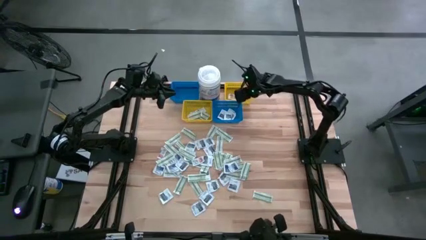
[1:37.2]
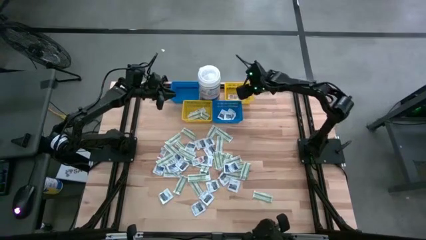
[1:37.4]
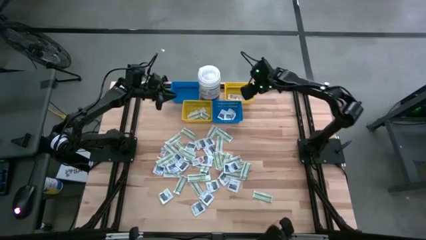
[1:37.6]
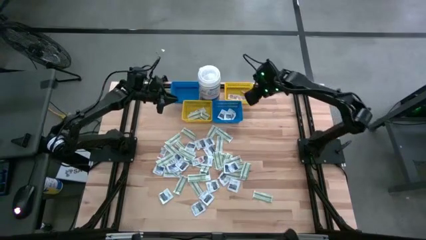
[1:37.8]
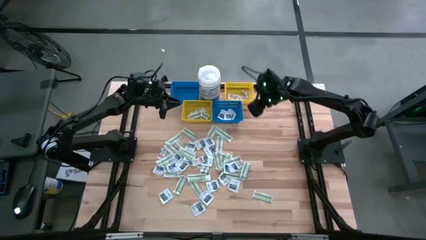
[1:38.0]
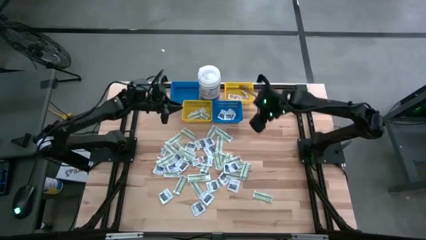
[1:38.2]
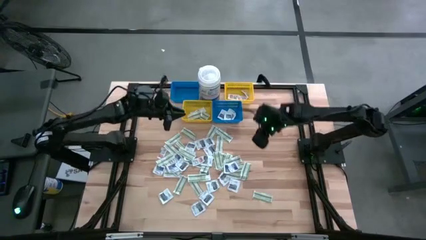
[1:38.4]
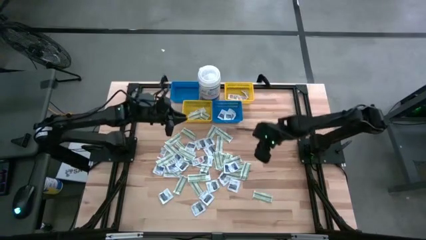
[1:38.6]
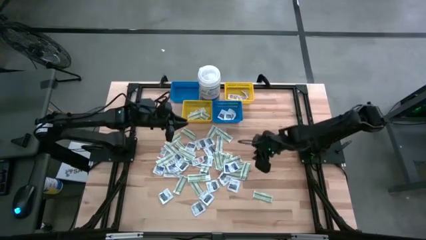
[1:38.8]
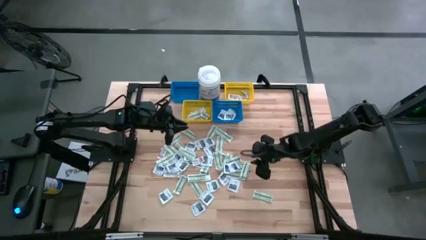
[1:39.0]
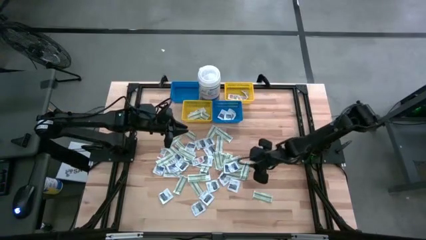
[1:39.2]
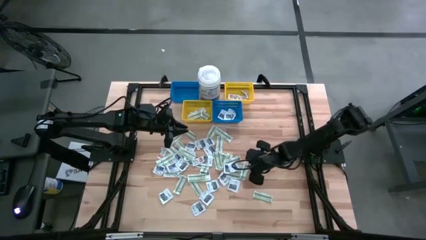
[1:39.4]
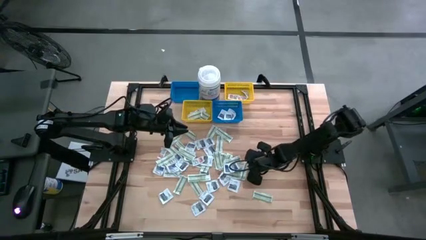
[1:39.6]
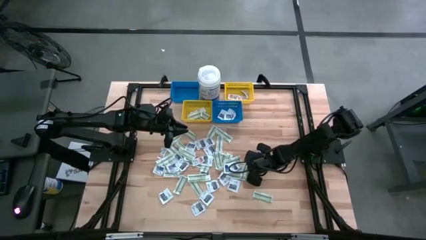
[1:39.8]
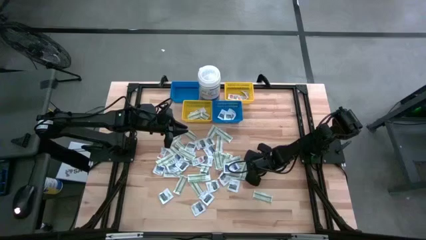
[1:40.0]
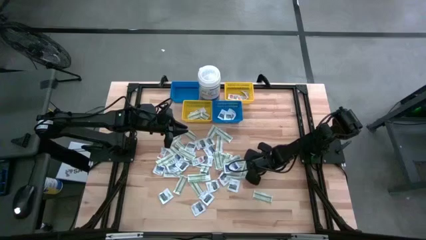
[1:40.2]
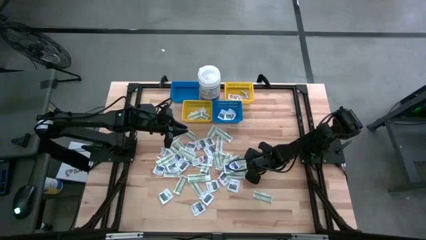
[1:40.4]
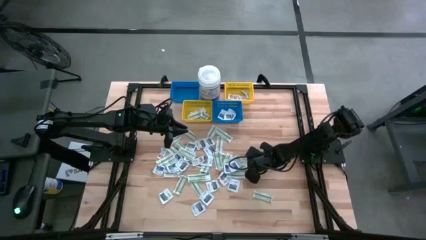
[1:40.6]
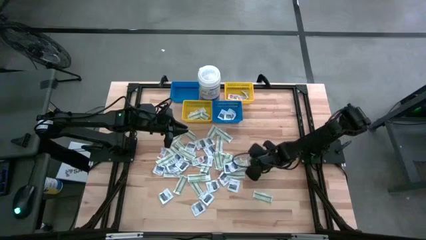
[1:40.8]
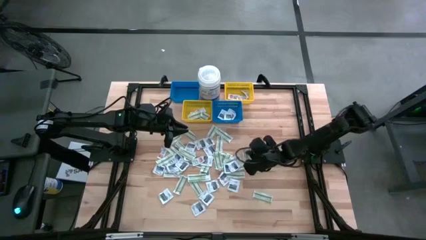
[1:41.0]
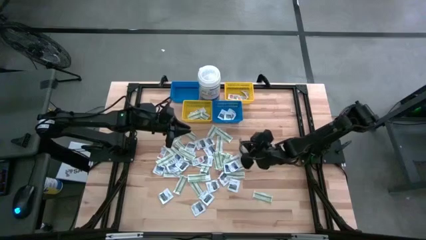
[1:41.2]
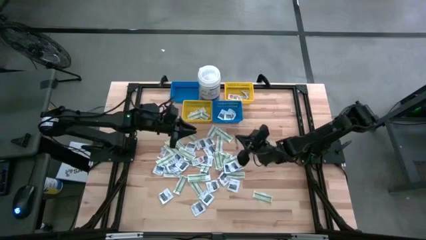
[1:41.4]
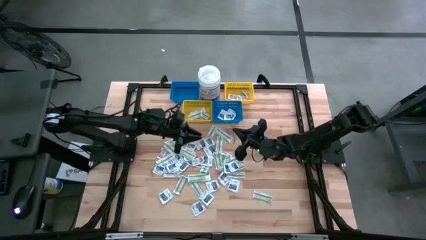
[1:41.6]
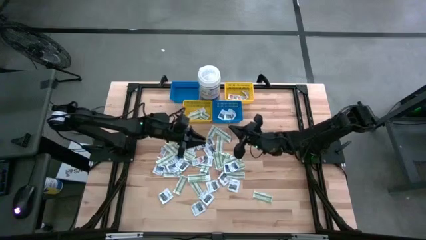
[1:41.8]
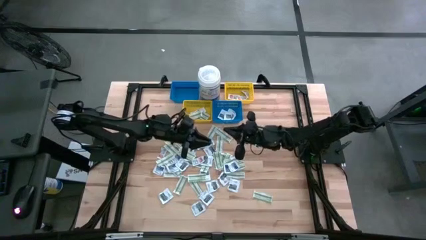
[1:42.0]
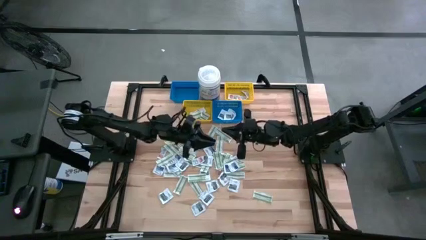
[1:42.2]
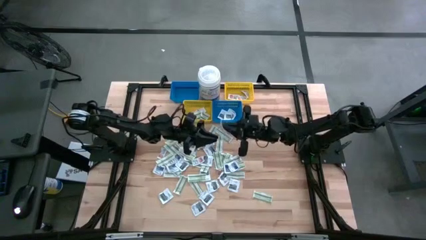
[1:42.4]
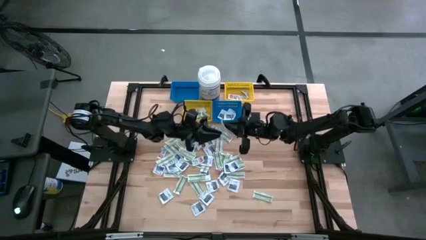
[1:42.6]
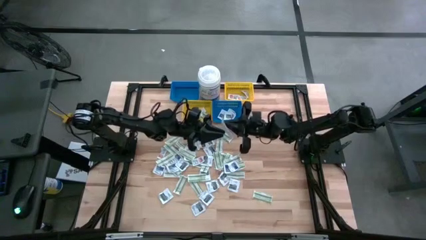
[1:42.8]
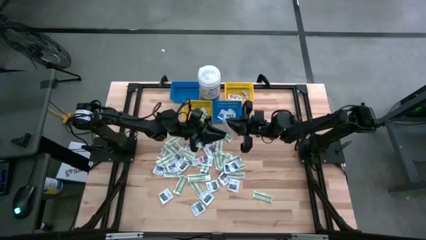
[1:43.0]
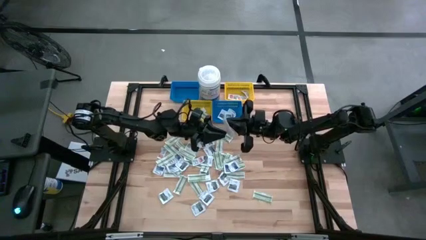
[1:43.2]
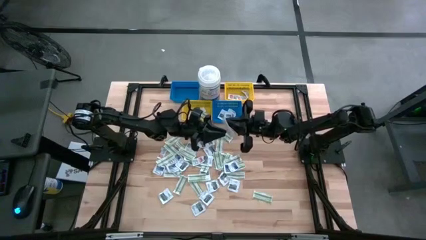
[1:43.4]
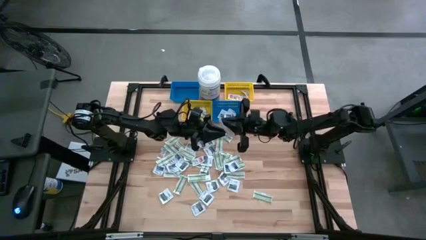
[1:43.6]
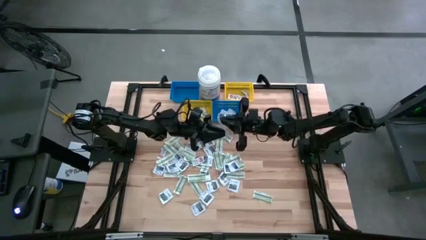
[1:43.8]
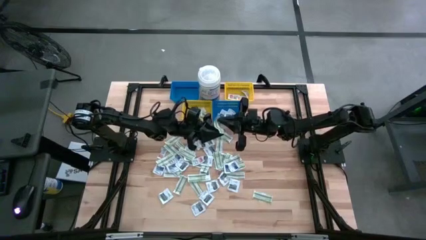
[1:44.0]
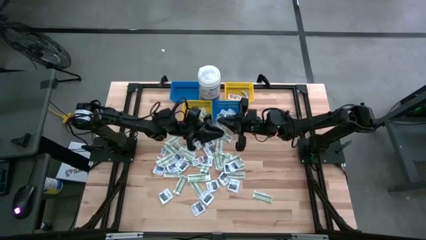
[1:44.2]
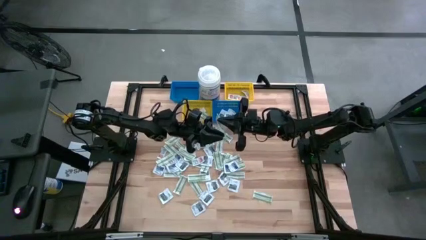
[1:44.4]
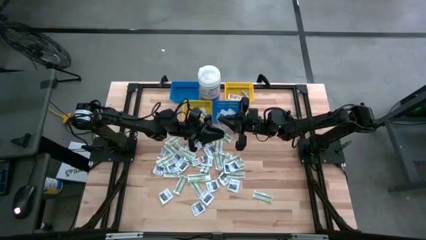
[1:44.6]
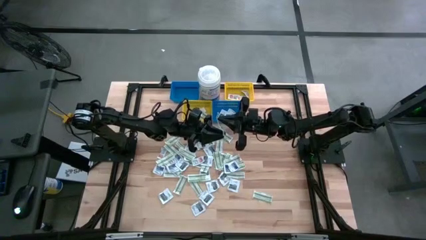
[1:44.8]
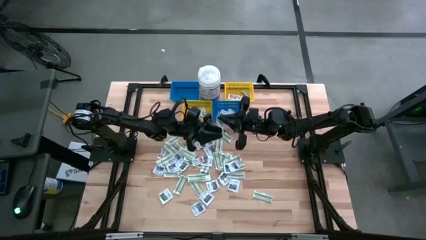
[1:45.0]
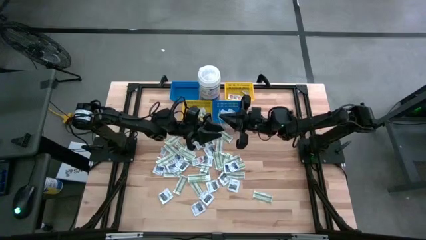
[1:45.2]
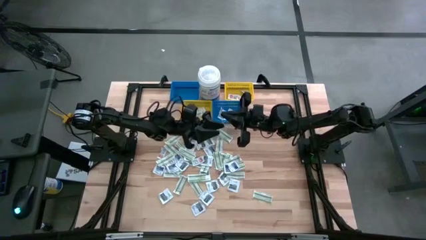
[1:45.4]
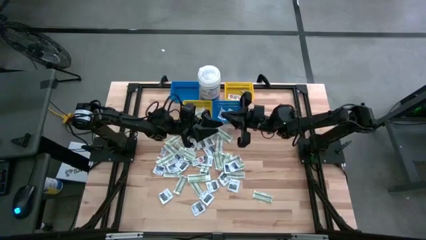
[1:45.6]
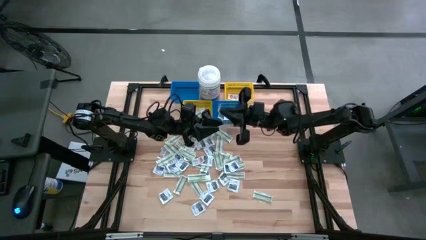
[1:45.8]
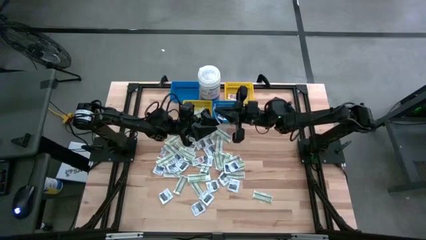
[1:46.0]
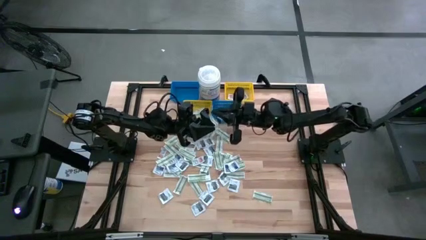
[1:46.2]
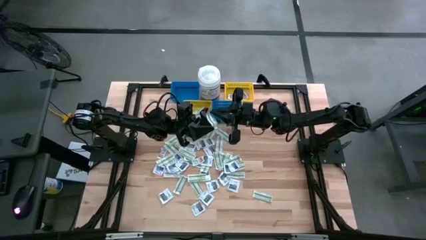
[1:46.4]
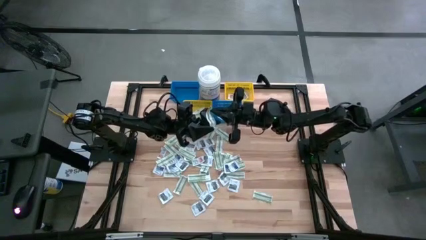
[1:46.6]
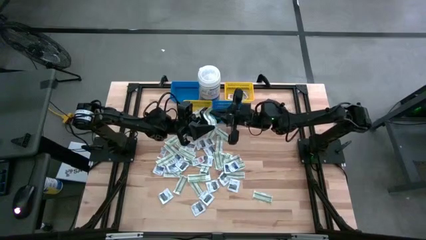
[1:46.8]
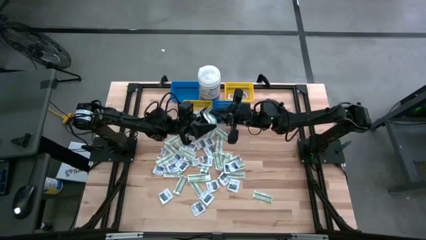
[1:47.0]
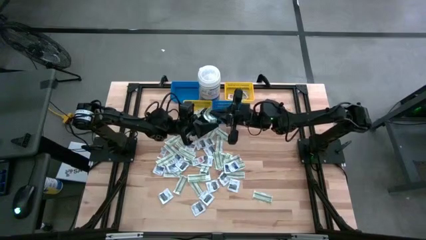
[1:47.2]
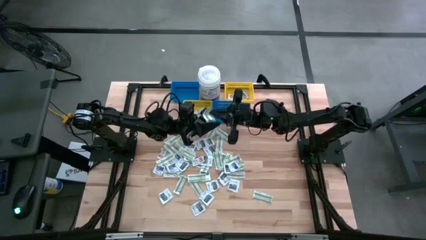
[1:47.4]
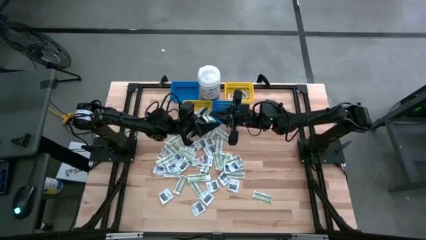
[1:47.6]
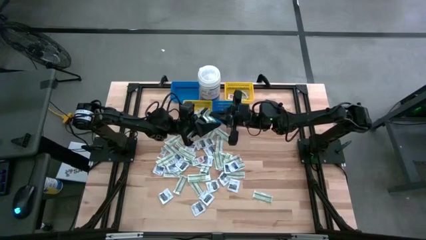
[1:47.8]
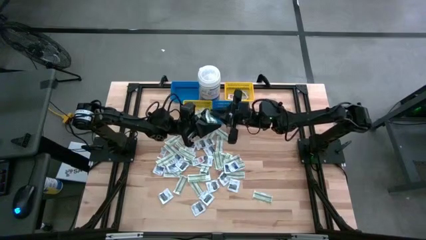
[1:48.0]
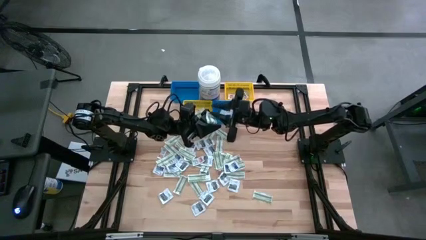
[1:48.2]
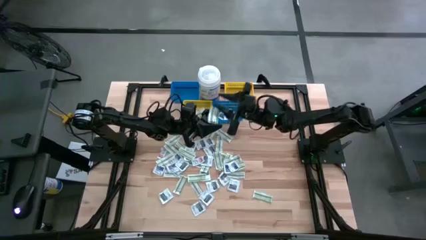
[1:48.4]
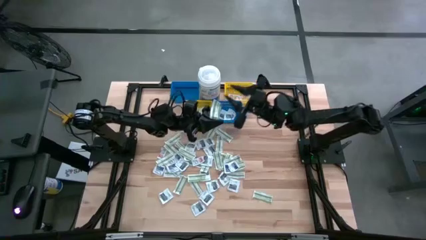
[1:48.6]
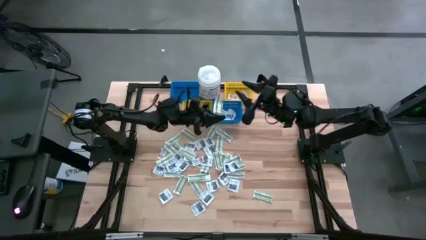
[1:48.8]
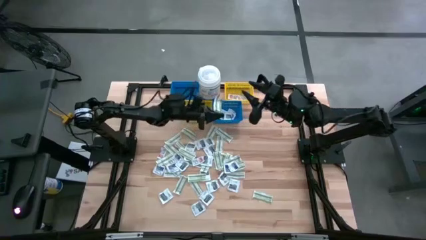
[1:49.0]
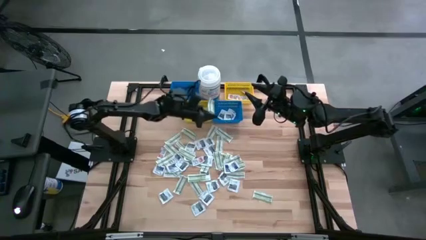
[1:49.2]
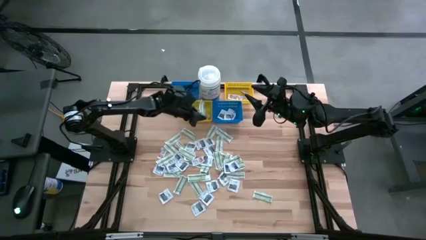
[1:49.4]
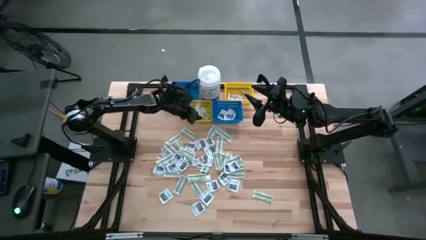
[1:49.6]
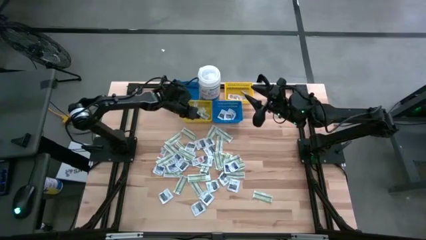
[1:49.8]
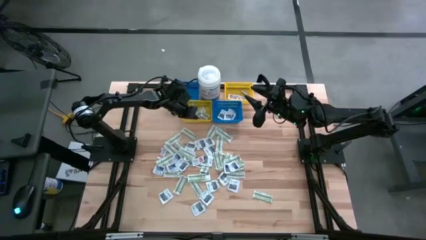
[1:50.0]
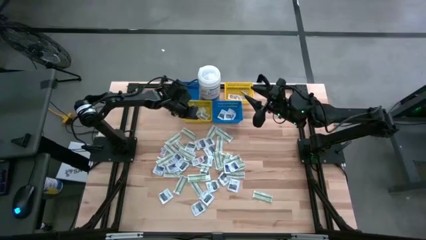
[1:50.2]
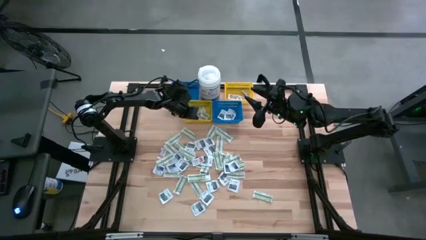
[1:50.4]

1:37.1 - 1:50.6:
Task: Pick & Place First Aid Supplies
Put the green bandage pad into the left yellow bin

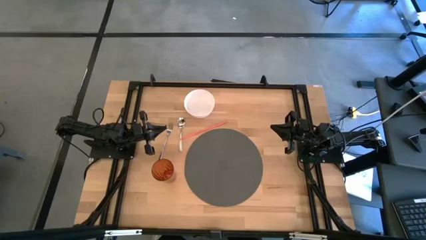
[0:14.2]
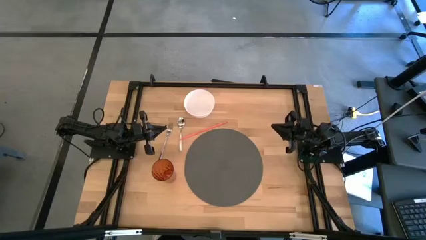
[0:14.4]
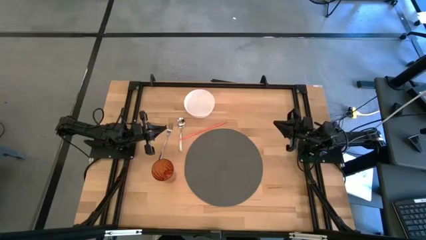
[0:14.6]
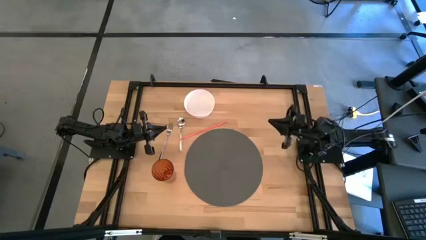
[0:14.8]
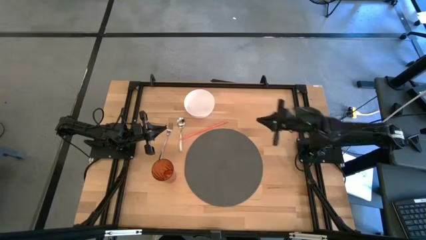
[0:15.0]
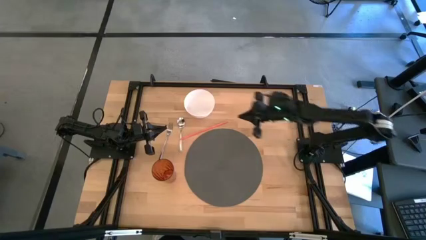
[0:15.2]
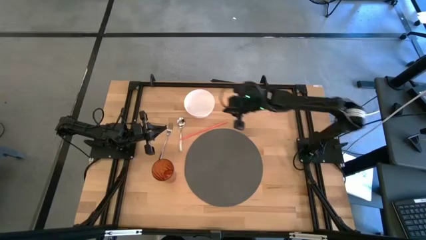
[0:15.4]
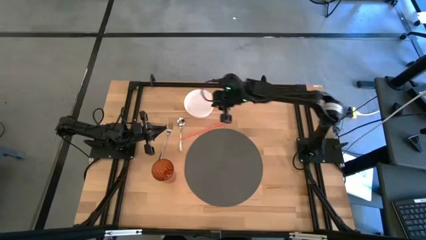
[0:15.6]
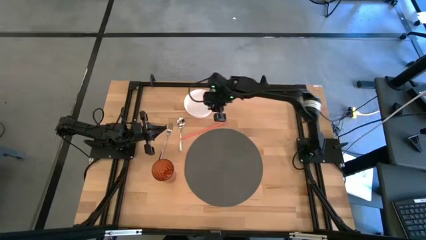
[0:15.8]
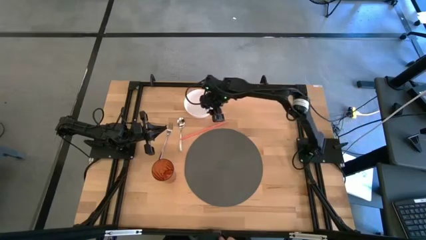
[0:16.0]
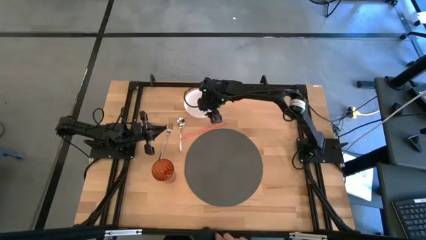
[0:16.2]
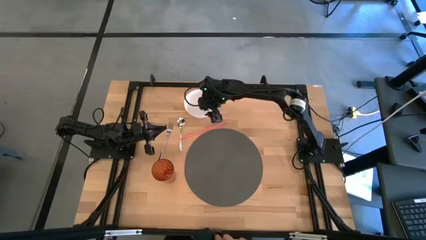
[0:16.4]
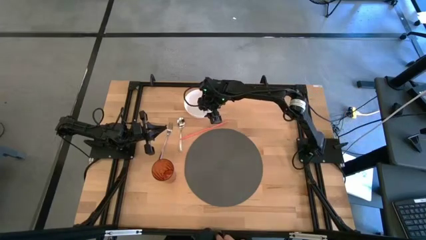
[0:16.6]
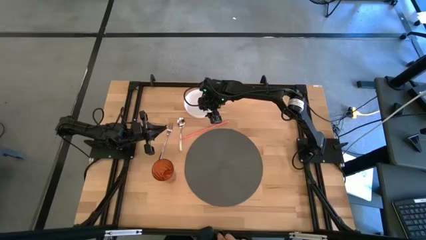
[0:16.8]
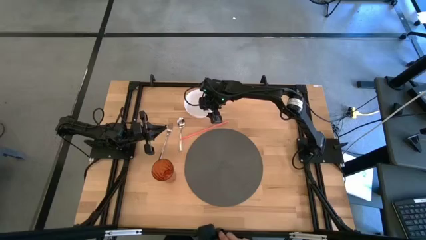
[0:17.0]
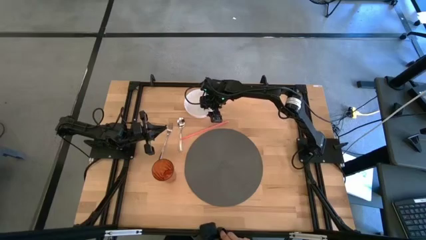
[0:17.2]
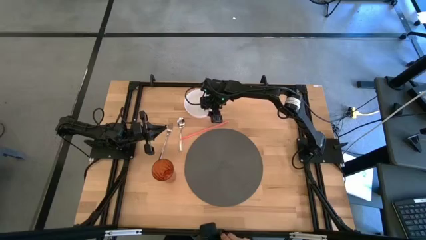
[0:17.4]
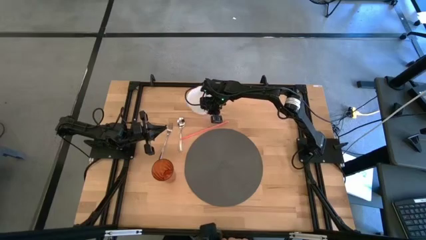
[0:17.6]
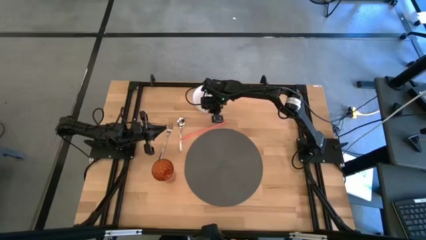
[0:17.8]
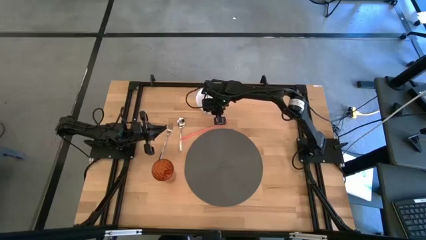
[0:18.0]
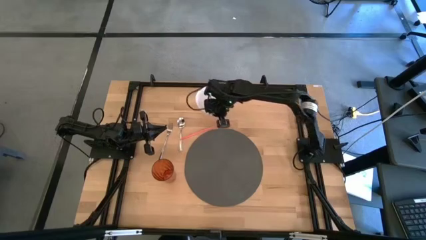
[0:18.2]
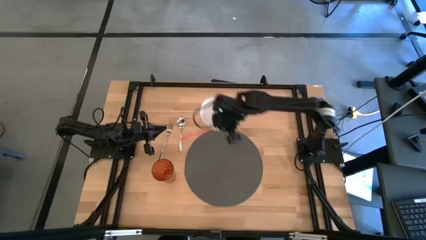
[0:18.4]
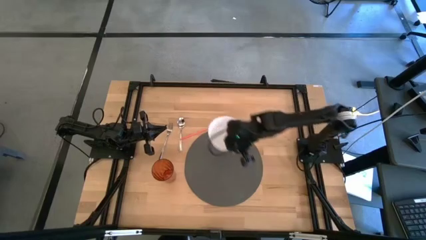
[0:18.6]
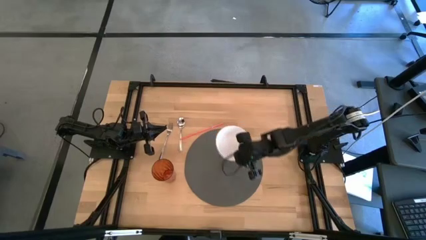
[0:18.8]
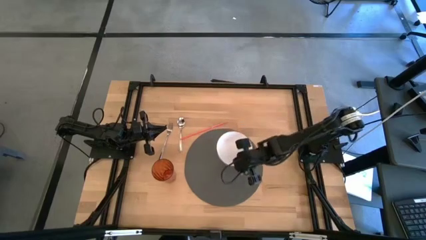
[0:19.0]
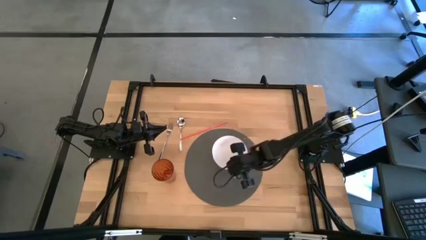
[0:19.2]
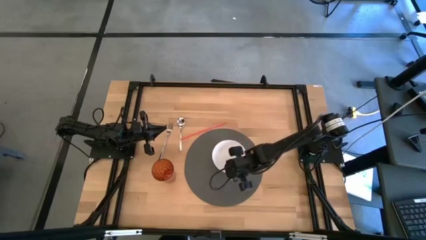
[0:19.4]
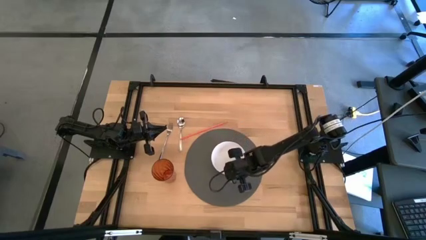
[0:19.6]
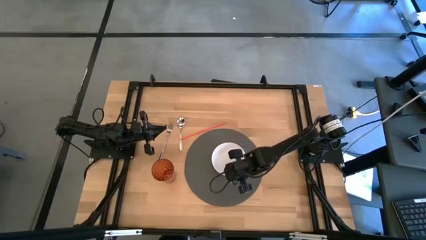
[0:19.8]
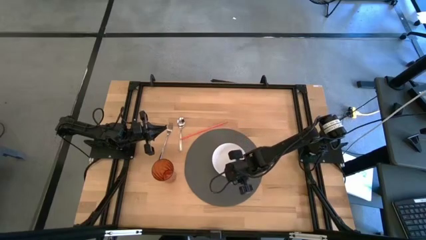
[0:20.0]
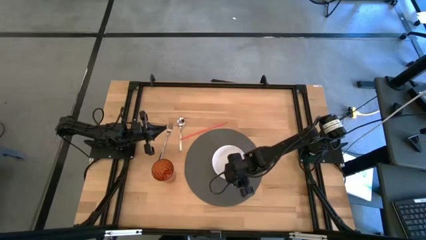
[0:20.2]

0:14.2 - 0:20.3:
Task: Pick & Place Utensil
Put the white bowl on the gray mat
